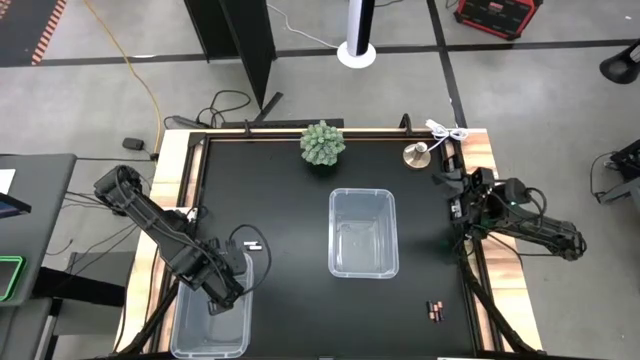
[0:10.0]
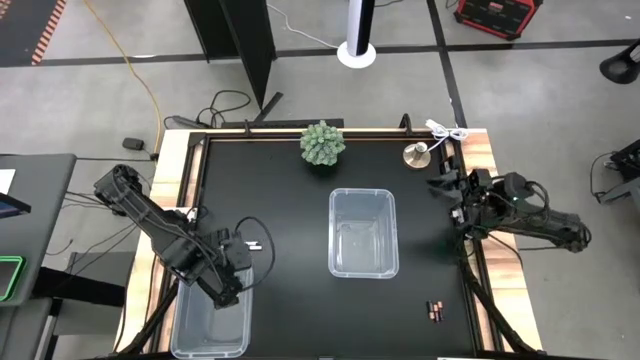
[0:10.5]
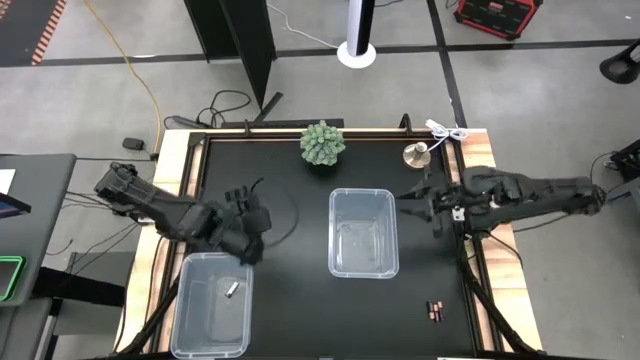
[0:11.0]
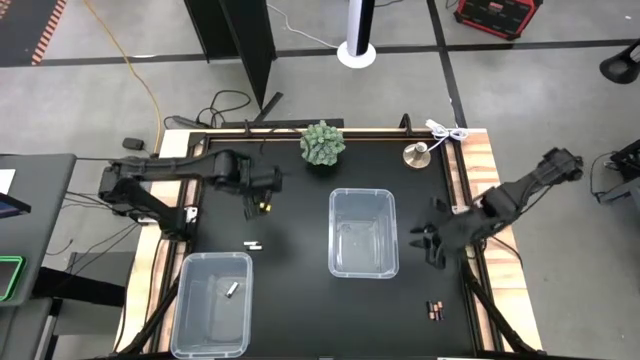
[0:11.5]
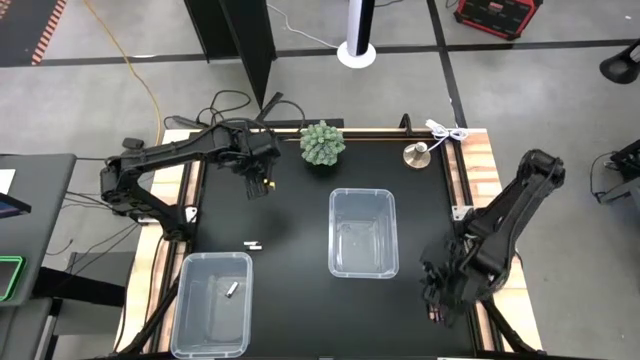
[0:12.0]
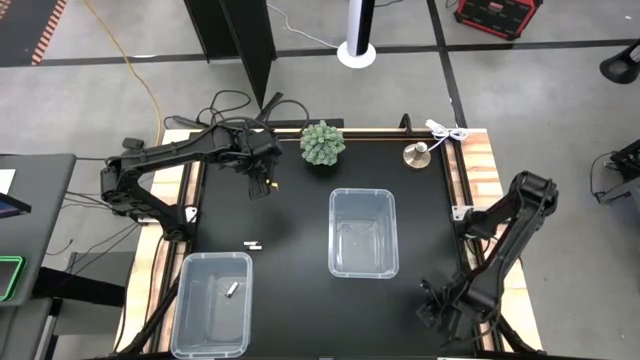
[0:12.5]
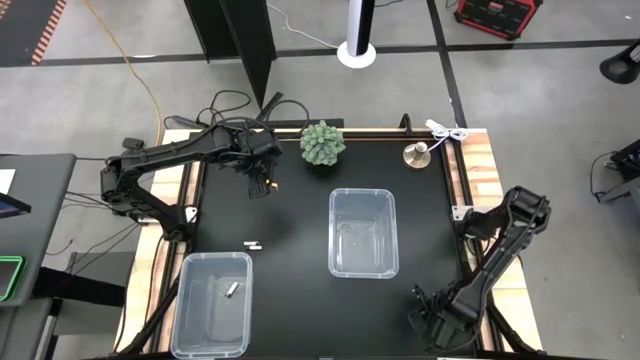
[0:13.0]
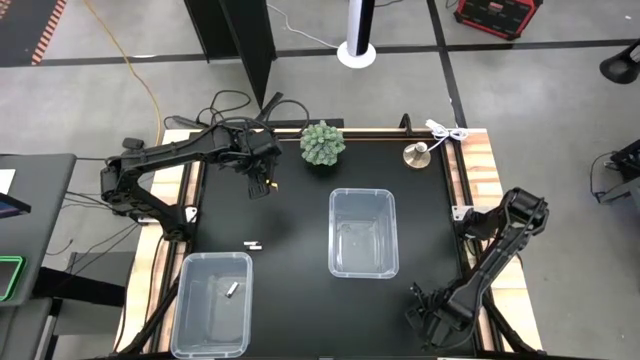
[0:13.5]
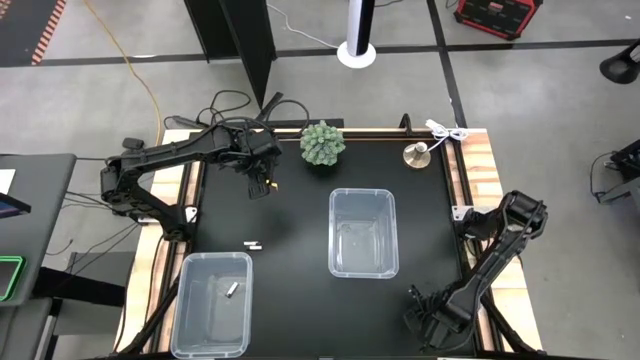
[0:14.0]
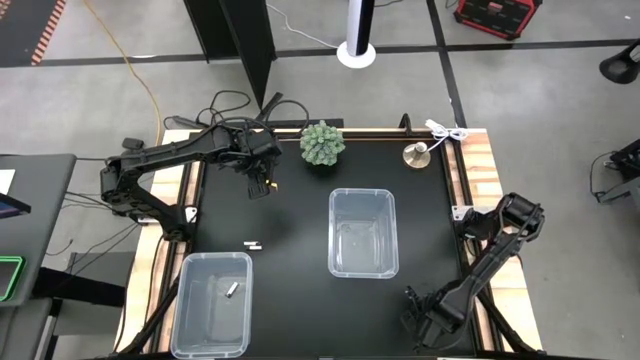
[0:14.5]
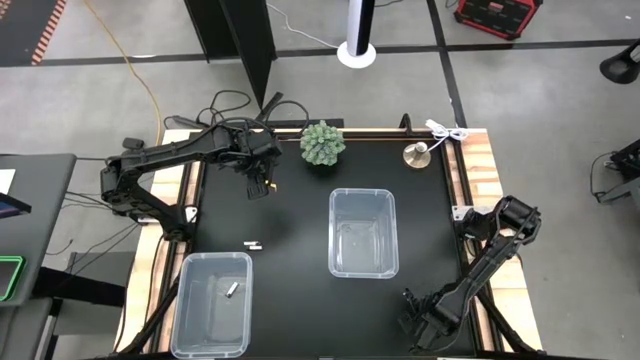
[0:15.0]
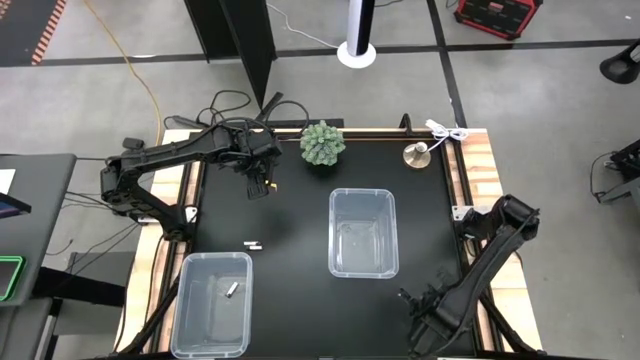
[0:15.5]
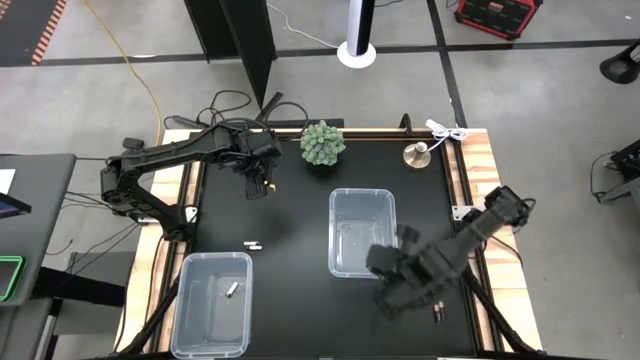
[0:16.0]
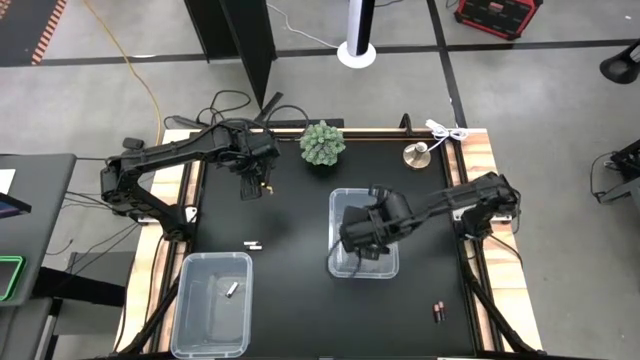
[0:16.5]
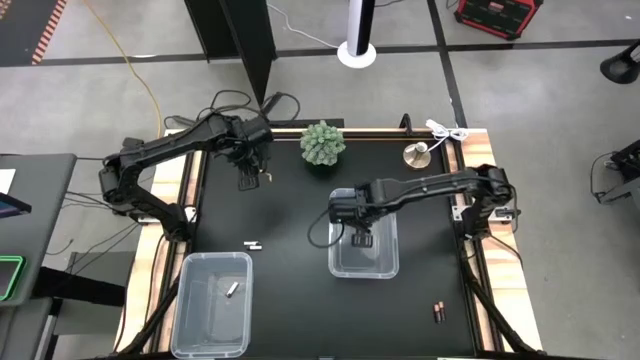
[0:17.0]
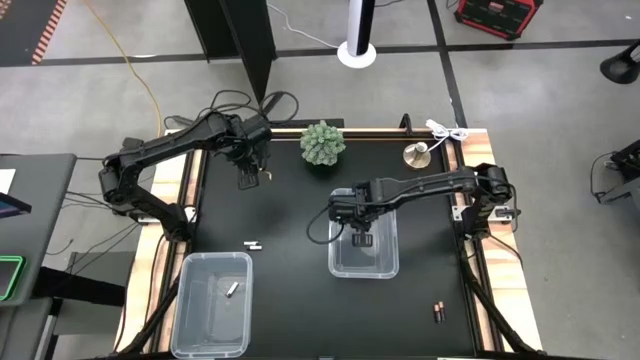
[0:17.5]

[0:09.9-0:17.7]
Task: Sort batteries
Put the left black battery into the top transparent bin

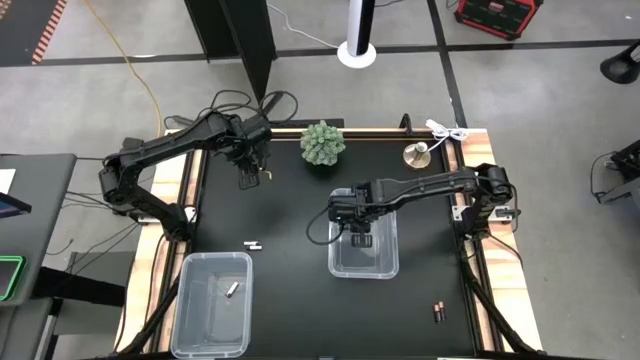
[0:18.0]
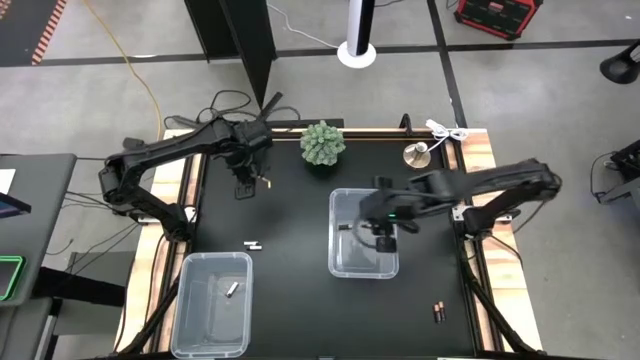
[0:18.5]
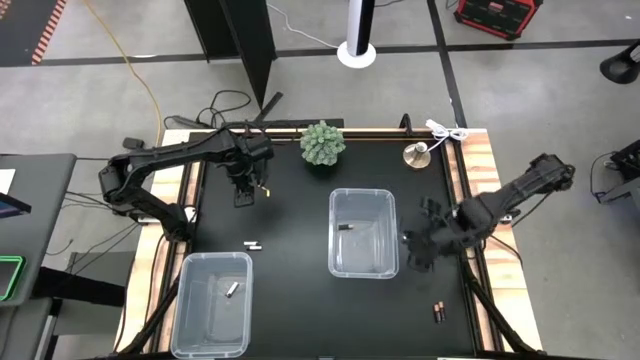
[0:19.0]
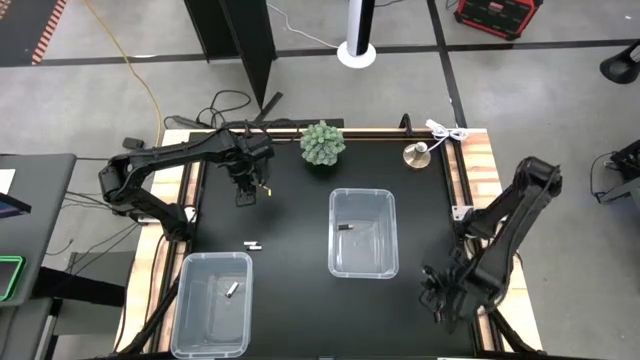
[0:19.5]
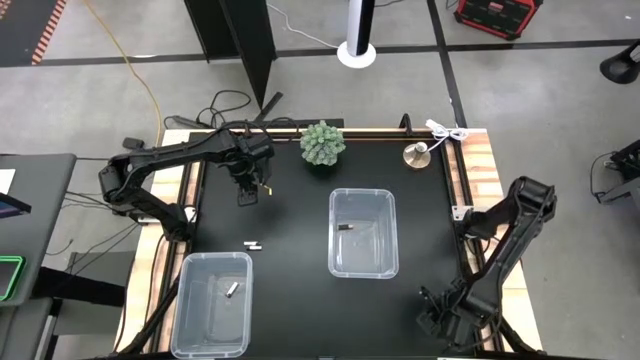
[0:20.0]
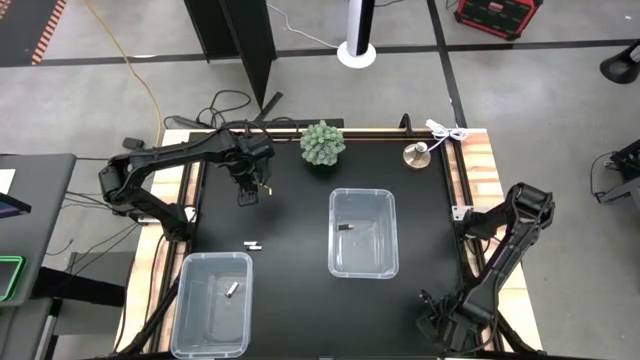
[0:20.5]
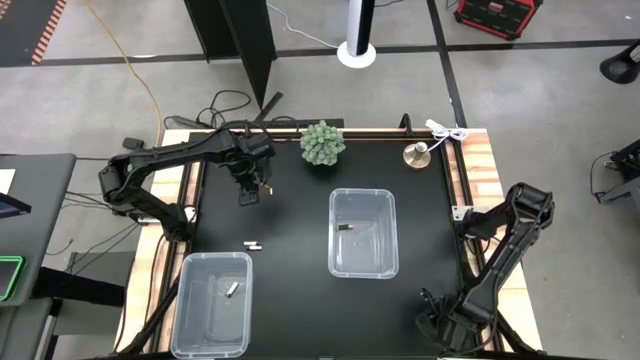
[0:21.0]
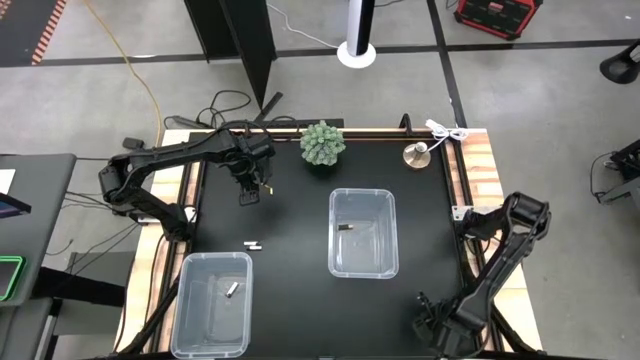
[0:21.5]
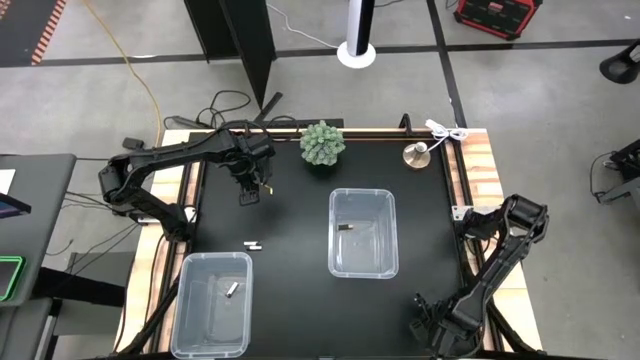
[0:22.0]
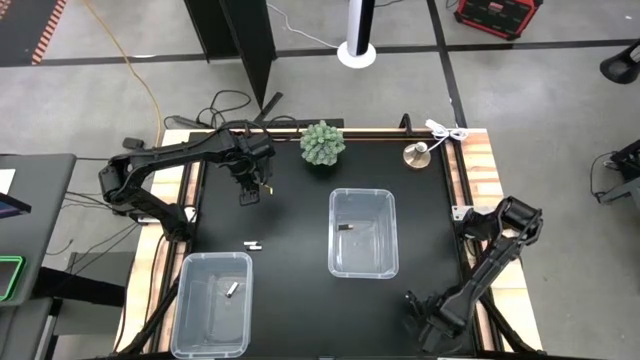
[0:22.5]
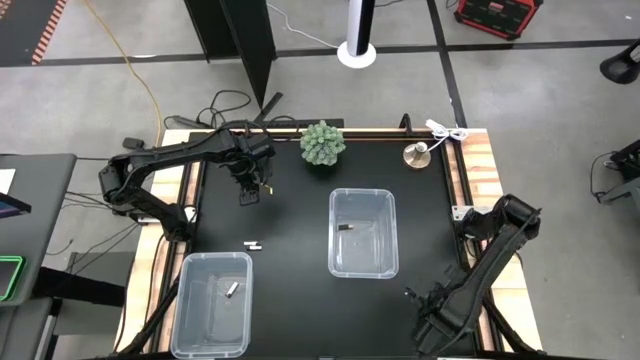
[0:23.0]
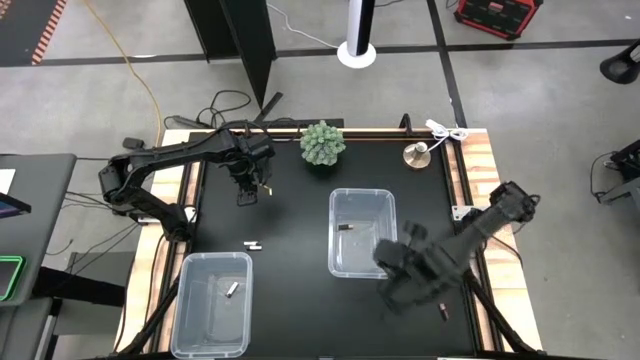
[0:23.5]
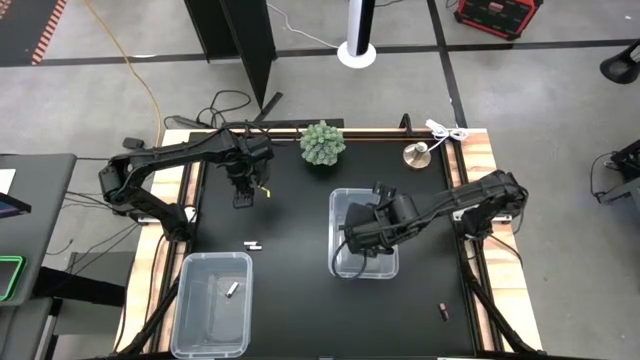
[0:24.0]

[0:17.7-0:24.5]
Put the left black battery into the top transparent bin

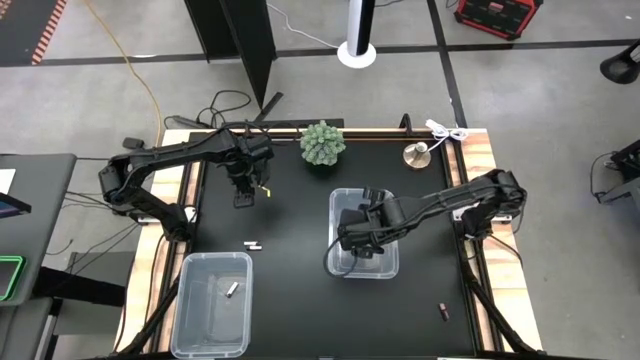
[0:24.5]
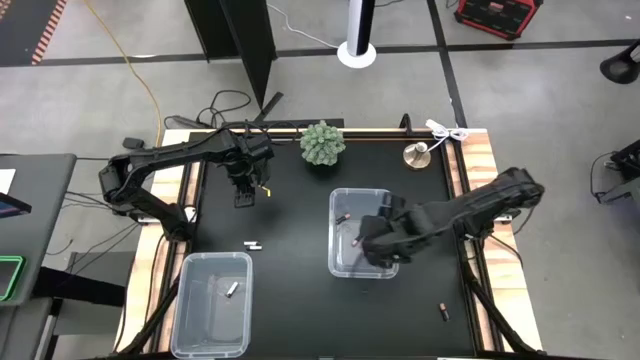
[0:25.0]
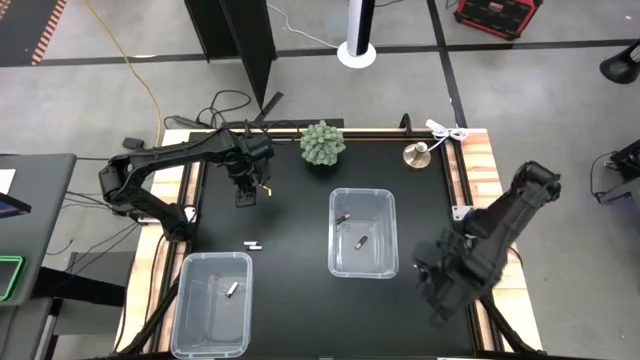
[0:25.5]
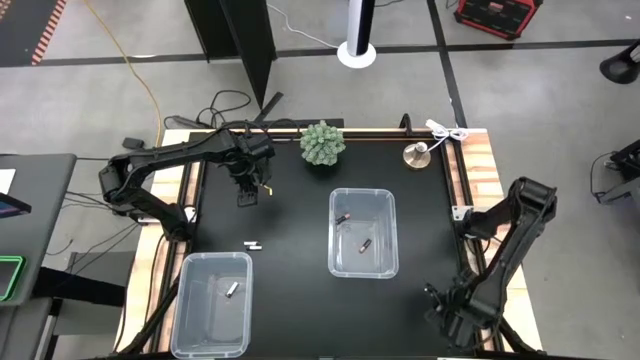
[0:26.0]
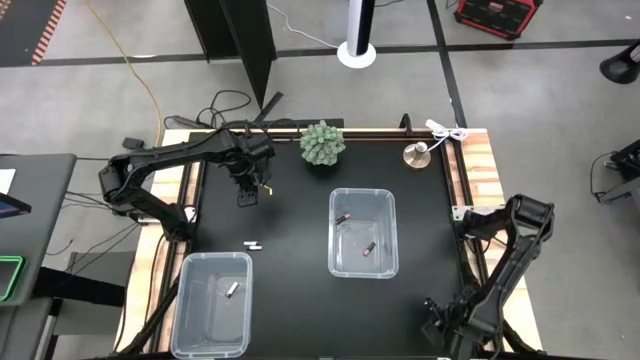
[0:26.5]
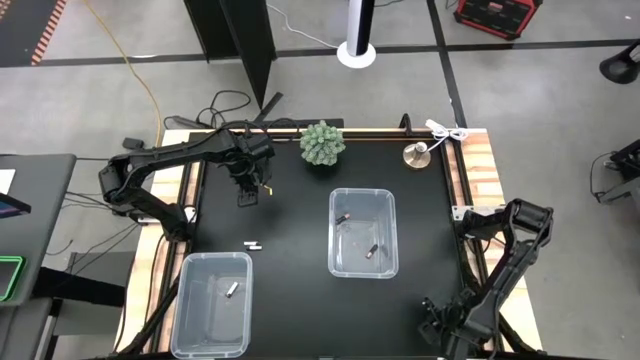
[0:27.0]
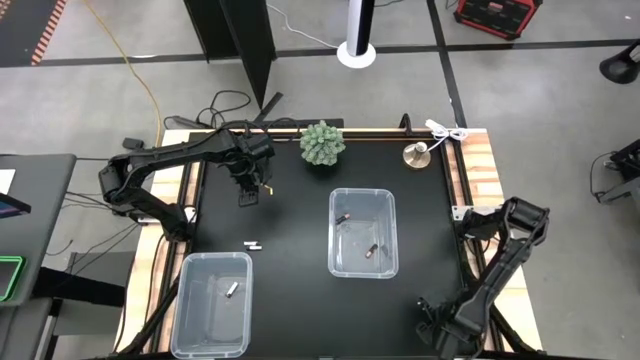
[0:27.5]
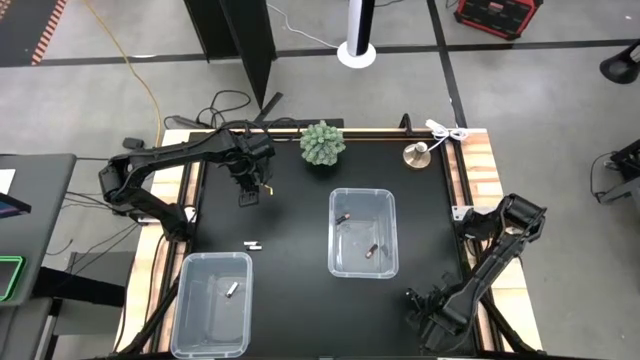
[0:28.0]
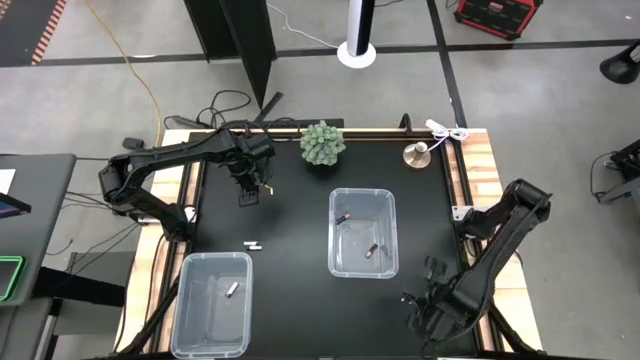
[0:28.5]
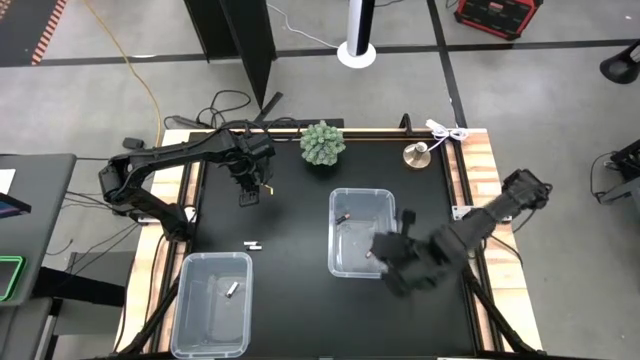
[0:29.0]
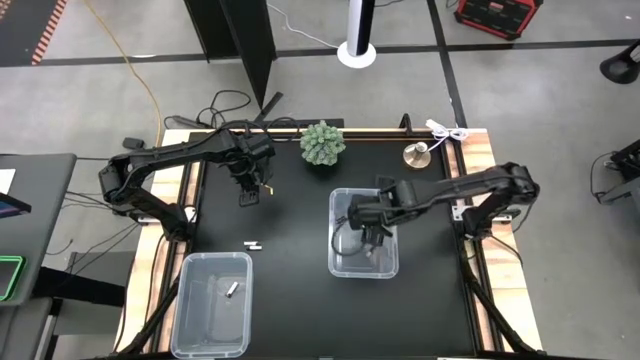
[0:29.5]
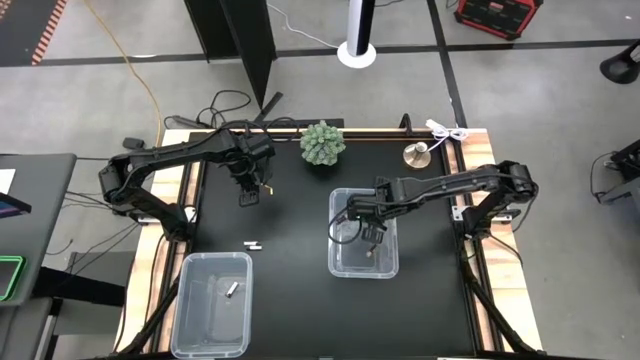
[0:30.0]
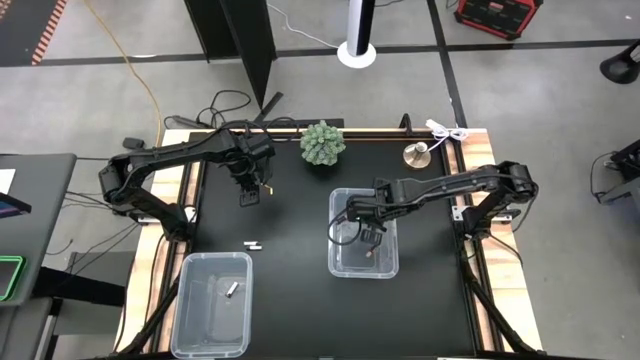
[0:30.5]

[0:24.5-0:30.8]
Put the black battery into the top transparent bin
